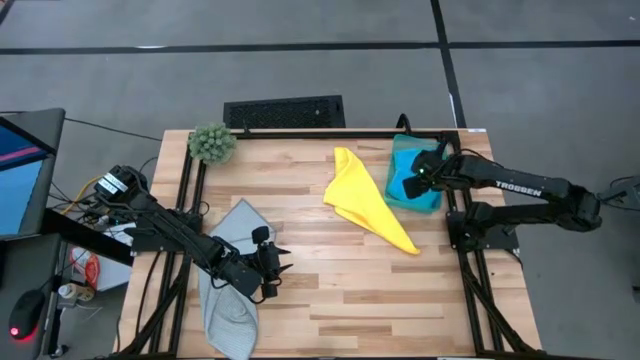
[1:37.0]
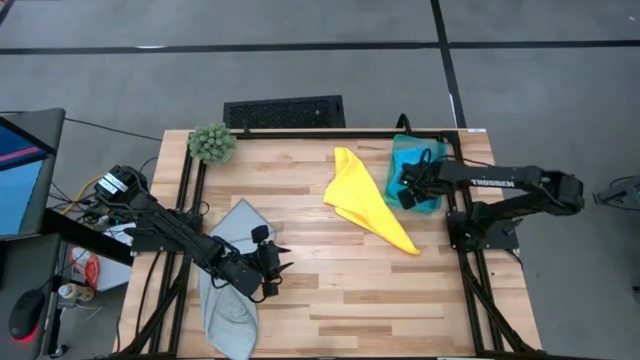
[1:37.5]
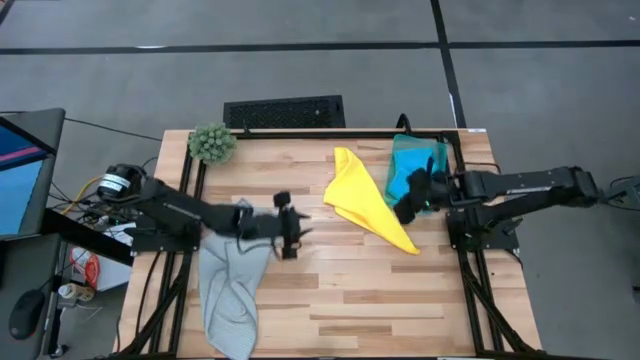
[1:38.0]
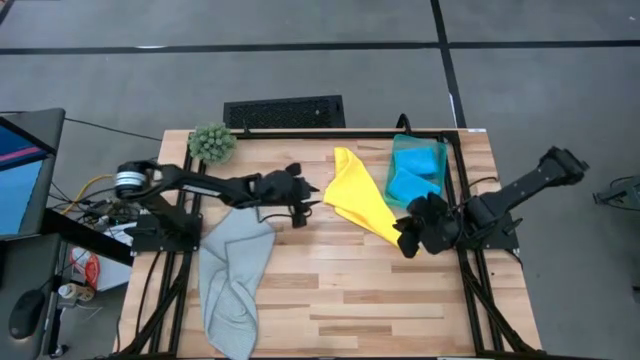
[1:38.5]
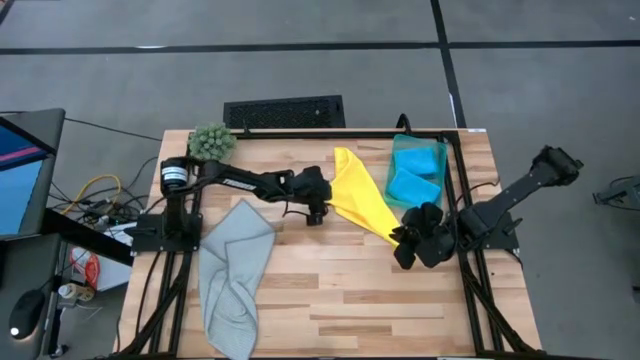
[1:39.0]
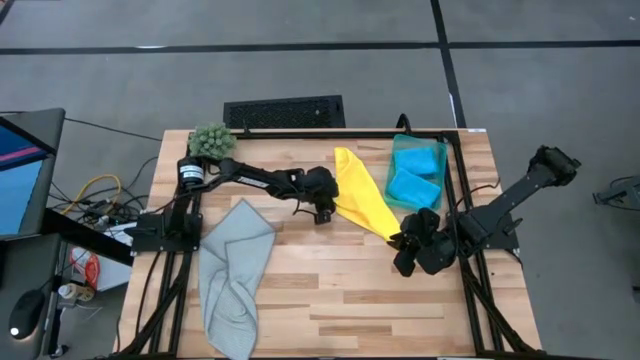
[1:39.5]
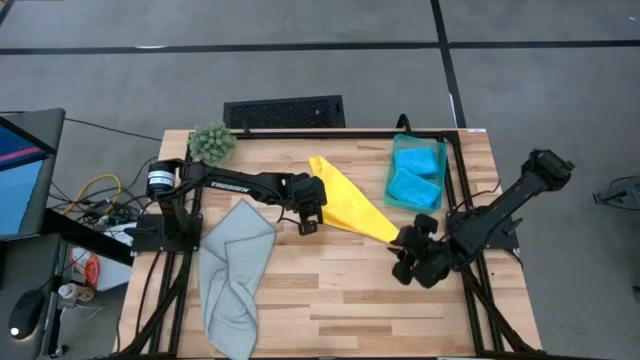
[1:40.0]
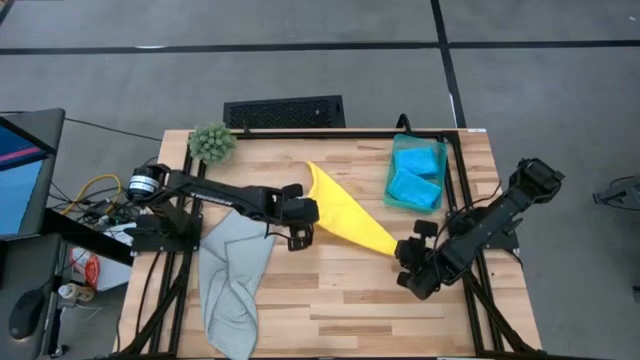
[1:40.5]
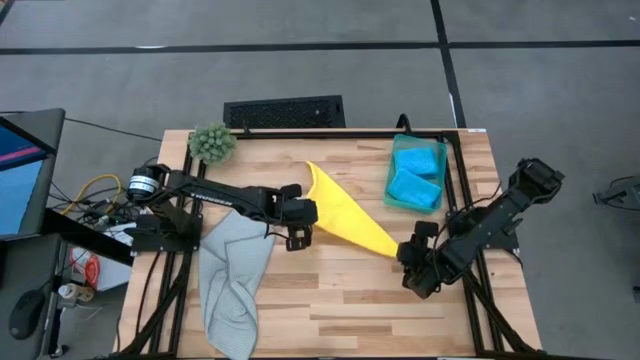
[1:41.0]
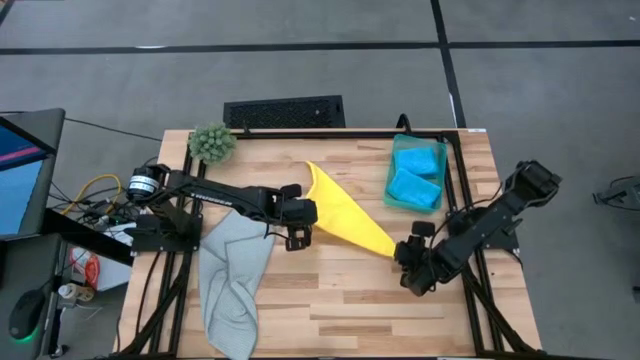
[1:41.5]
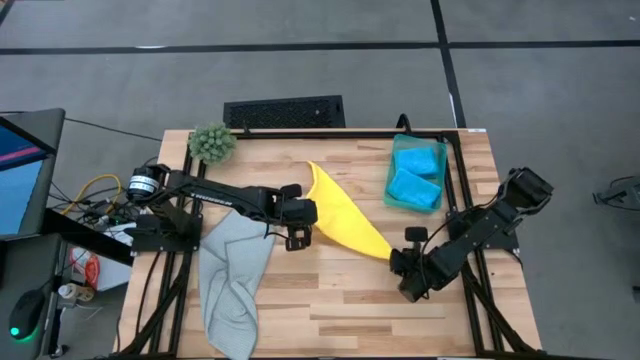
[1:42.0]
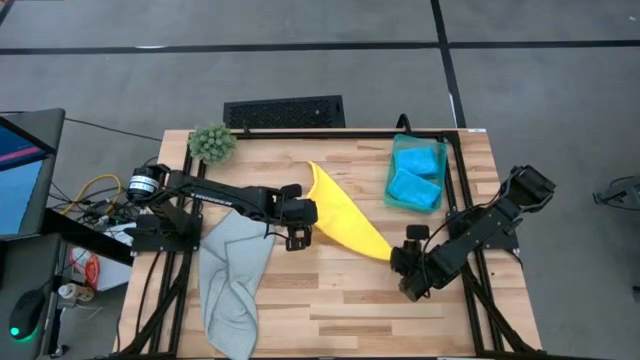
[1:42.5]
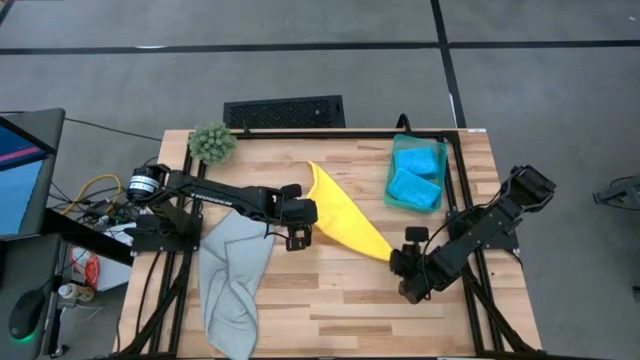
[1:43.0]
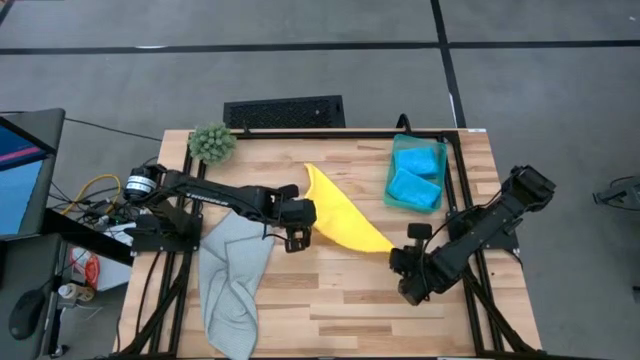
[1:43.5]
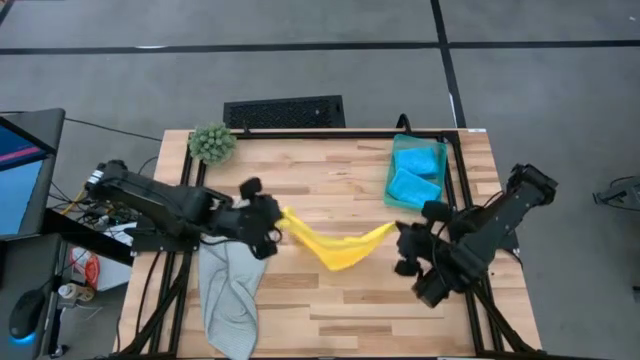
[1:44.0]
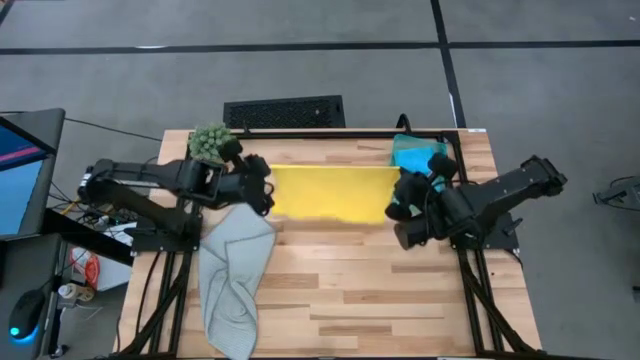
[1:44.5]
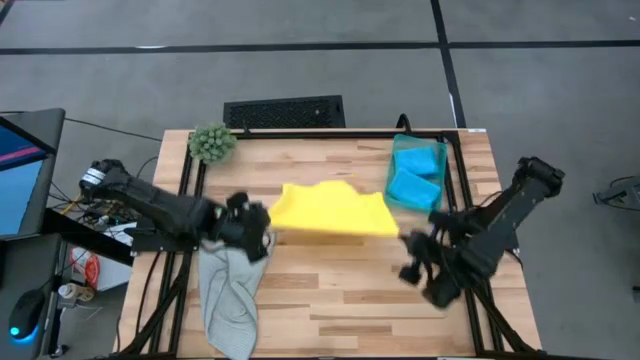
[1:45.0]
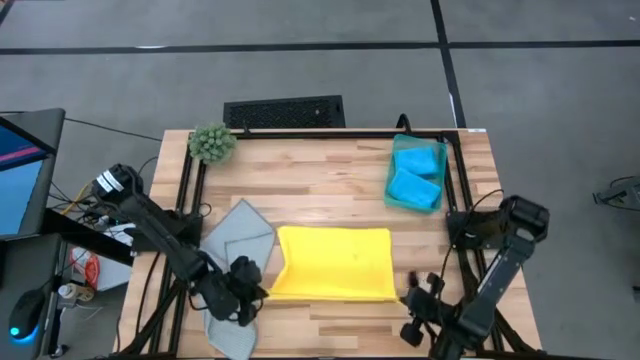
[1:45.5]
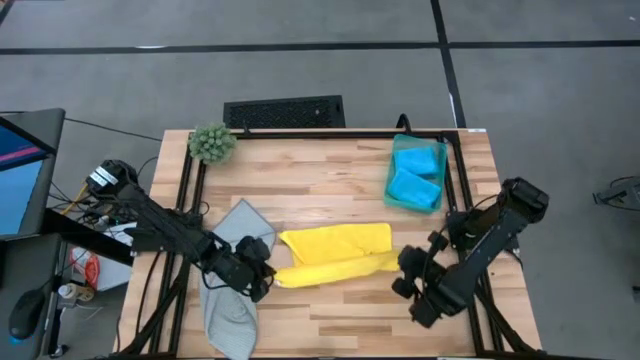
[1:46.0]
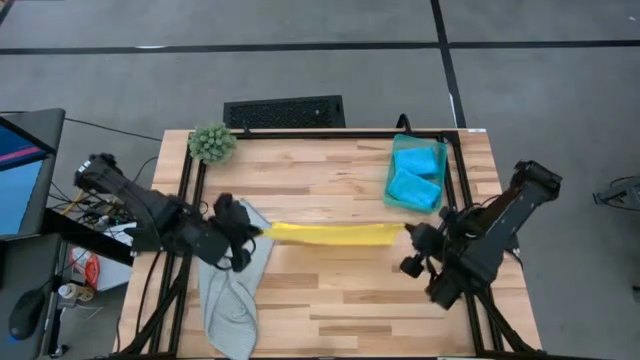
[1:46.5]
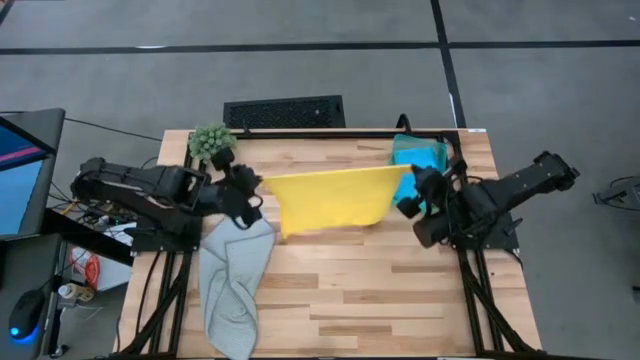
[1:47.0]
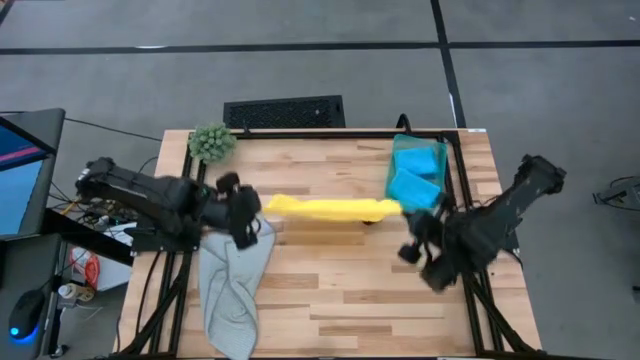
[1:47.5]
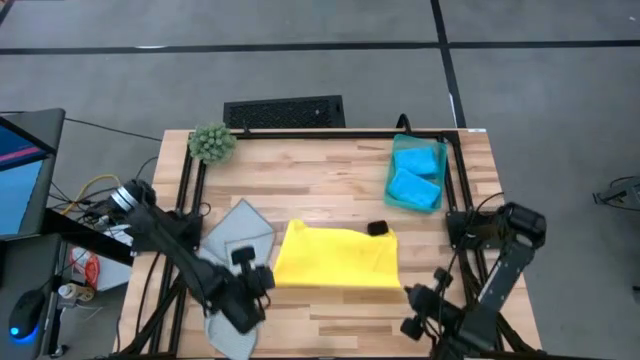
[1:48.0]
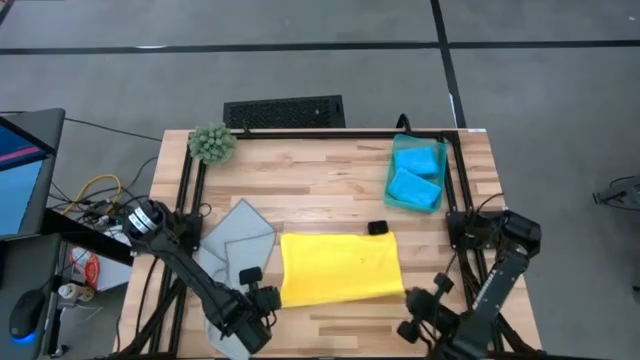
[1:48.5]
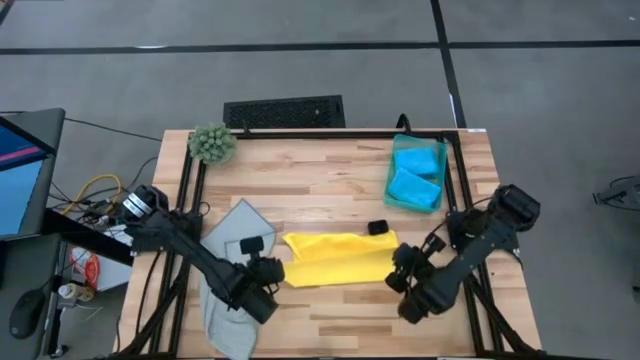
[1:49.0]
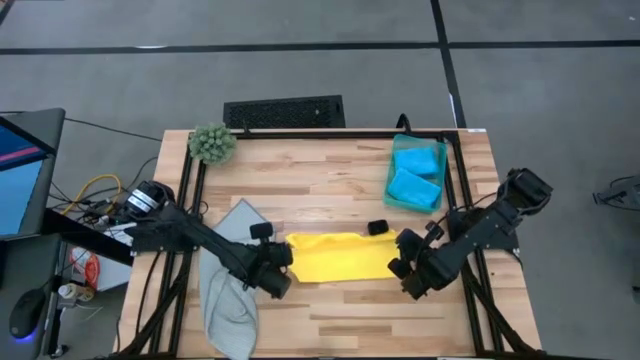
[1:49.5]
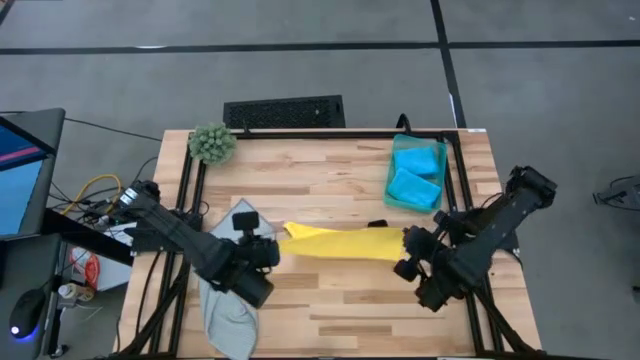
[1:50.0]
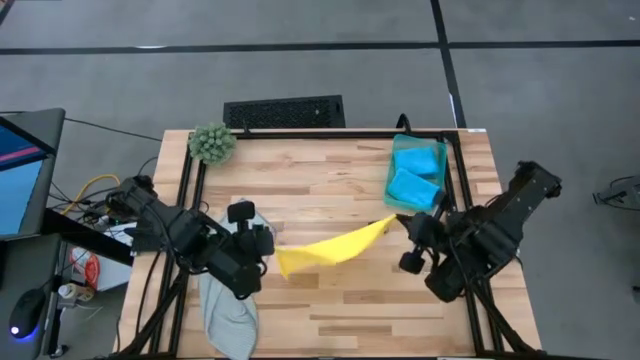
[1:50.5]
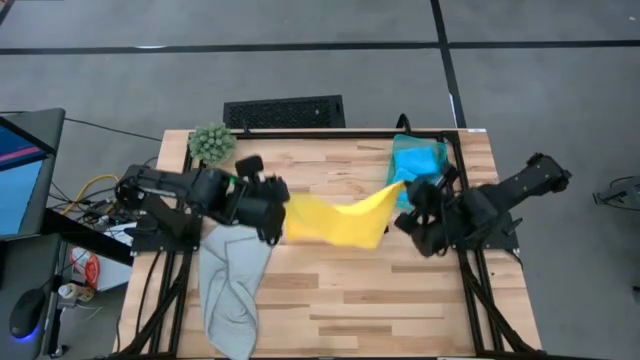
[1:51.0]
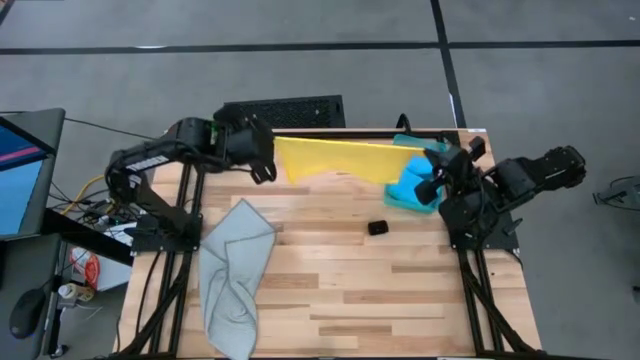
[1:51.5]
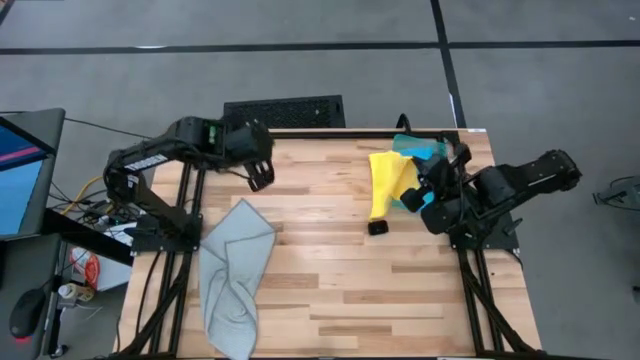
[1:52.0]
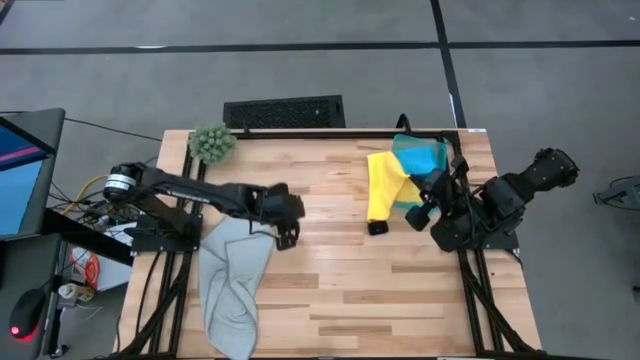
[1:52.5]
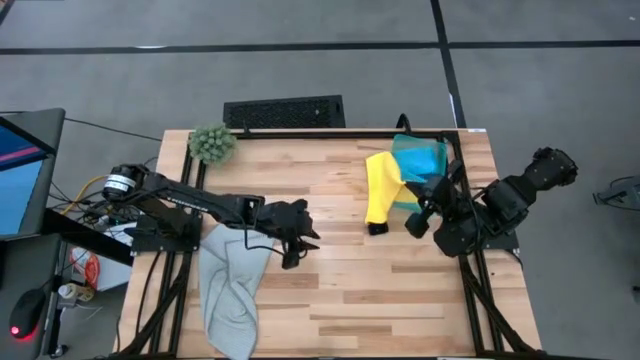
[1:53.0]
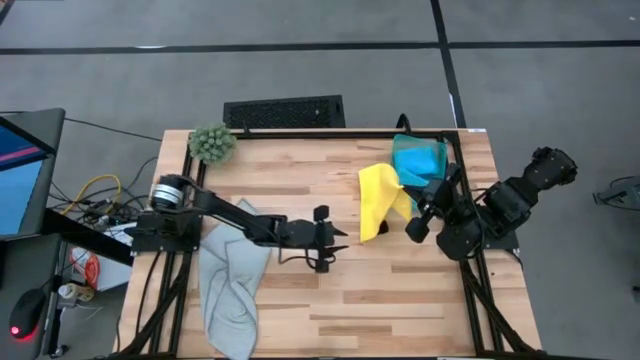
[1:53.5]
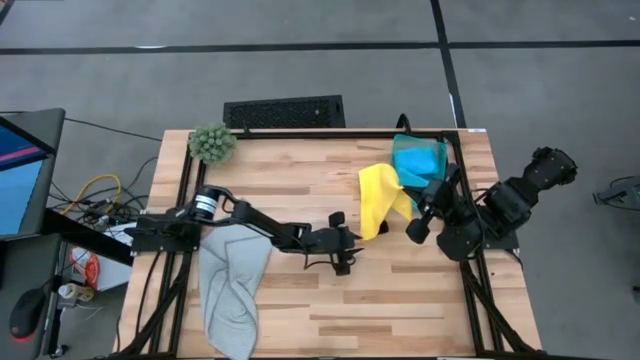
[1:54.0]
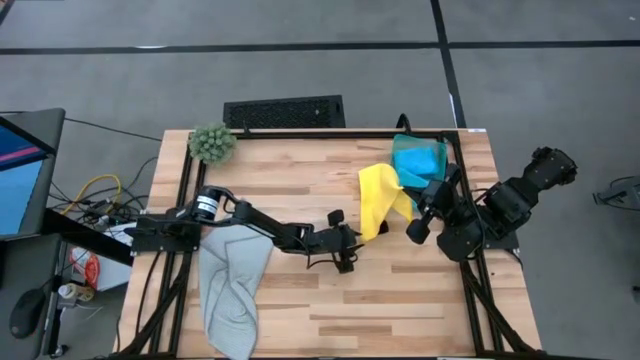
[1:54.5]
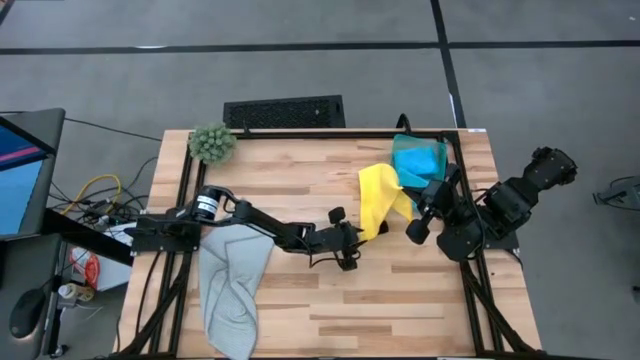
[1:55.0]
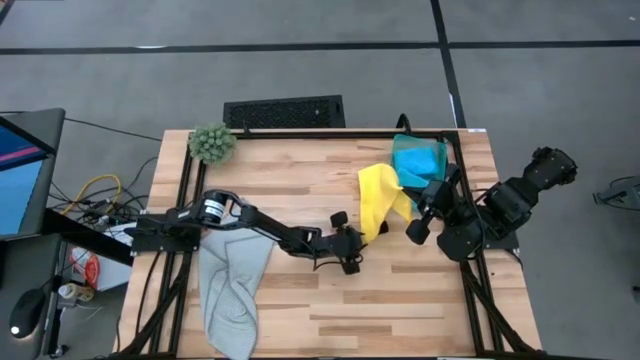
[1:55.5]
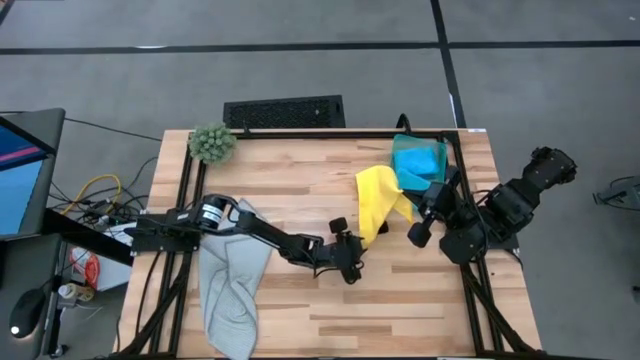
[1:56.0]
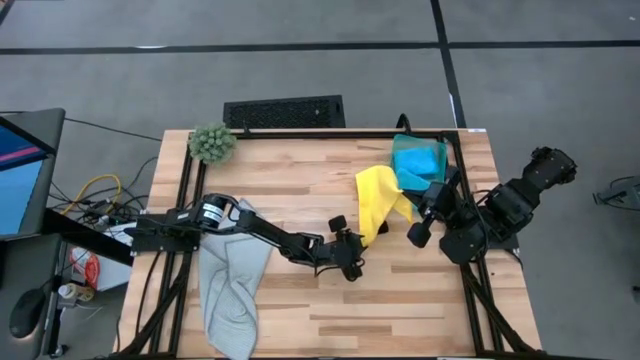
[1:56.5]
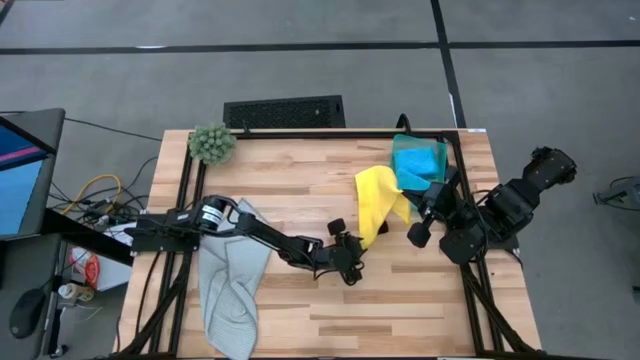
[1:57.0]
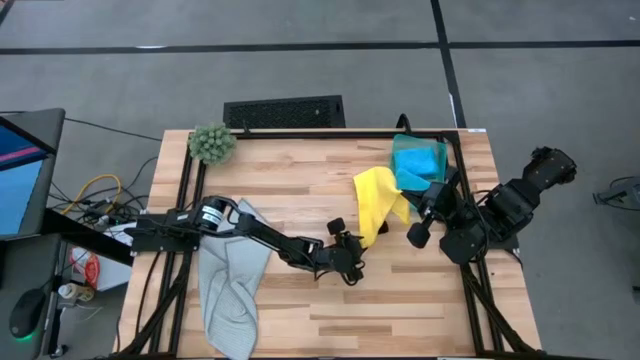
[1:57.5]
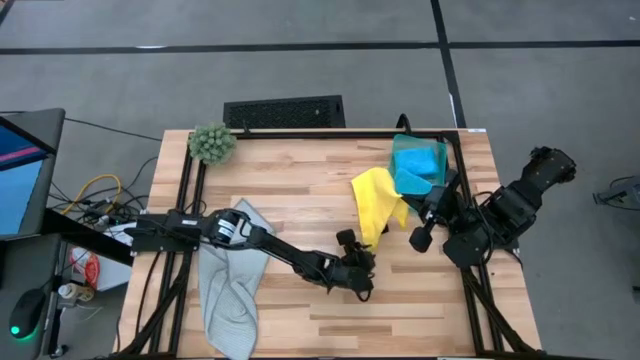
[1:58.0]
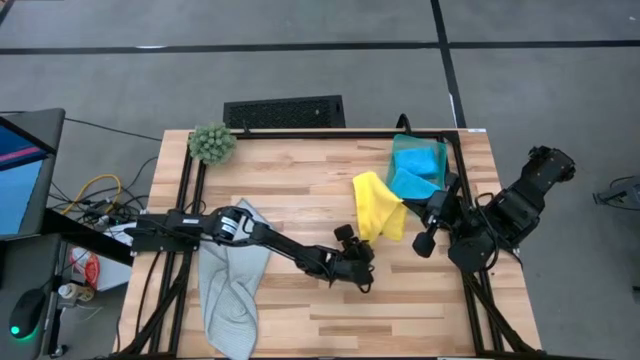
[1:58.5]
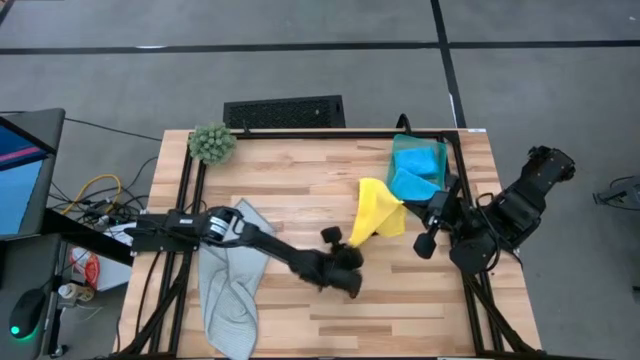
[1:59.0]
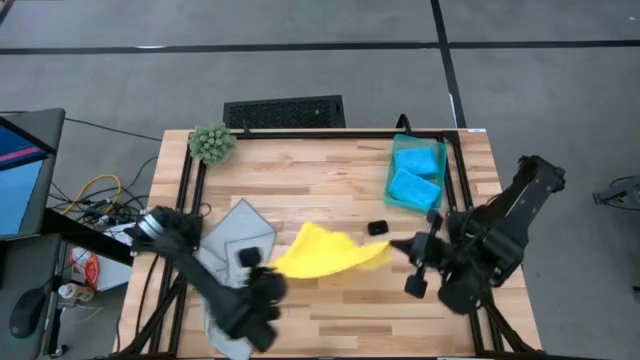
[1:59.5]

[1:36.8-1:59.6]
Task: Fold microfiber towels
Fold the yellow microfiber cloth
